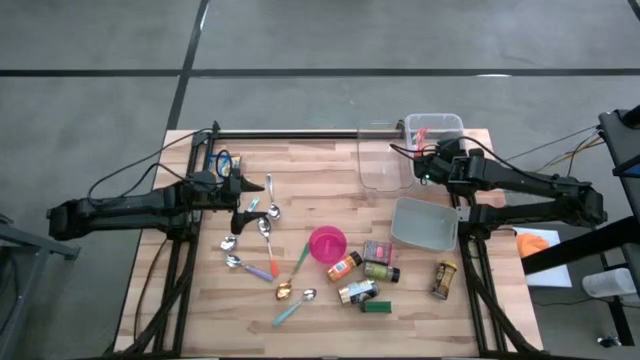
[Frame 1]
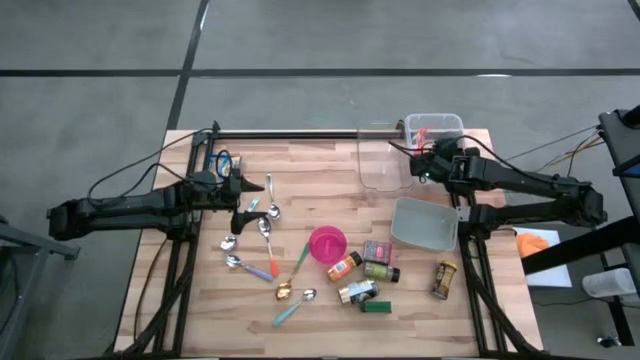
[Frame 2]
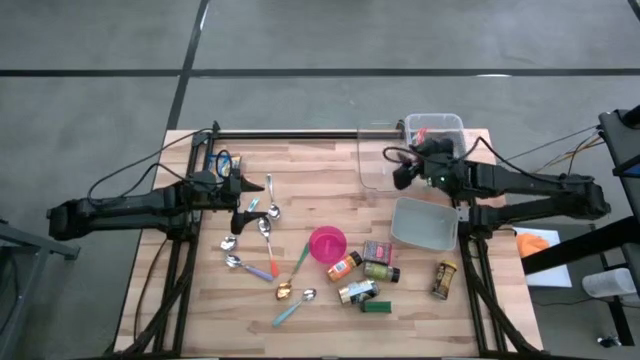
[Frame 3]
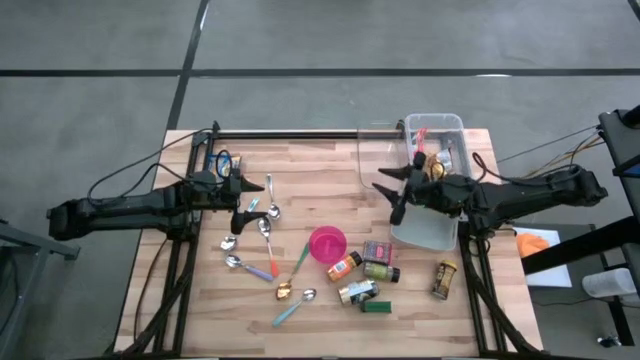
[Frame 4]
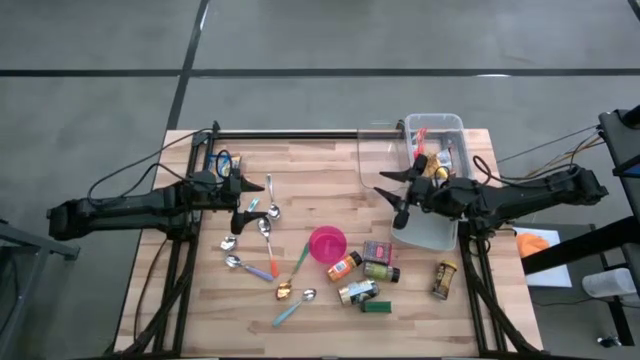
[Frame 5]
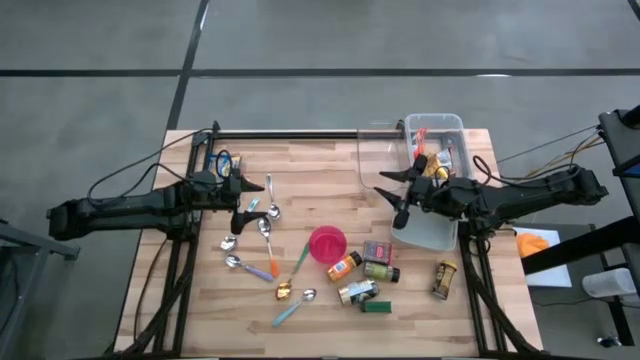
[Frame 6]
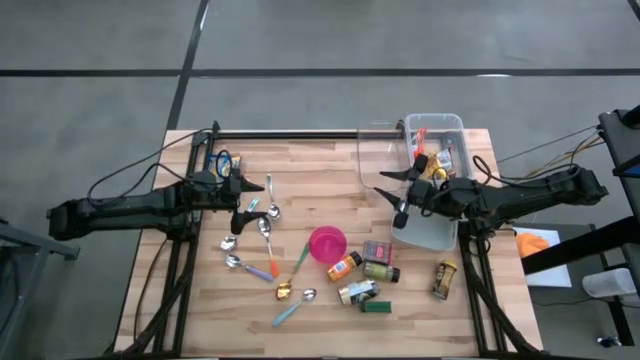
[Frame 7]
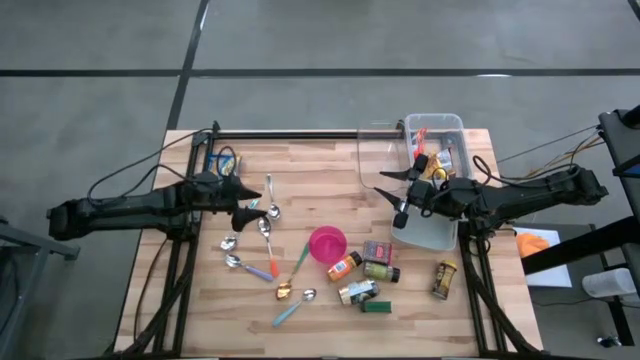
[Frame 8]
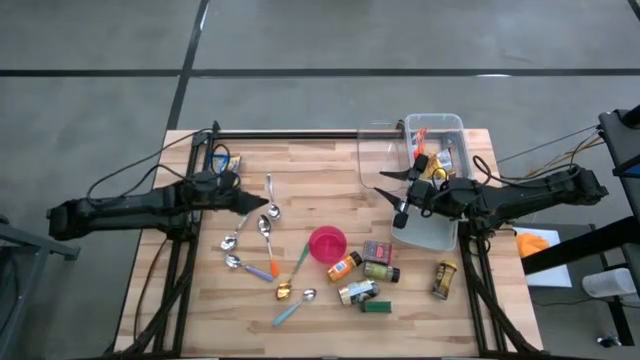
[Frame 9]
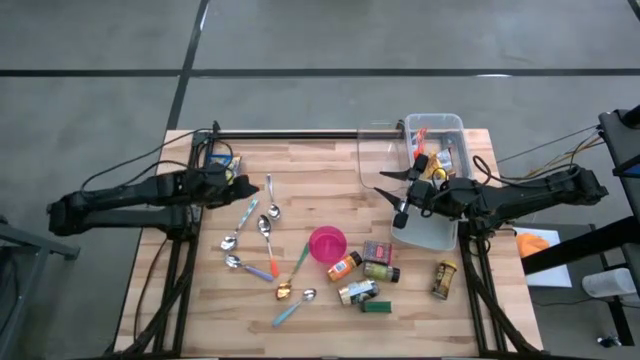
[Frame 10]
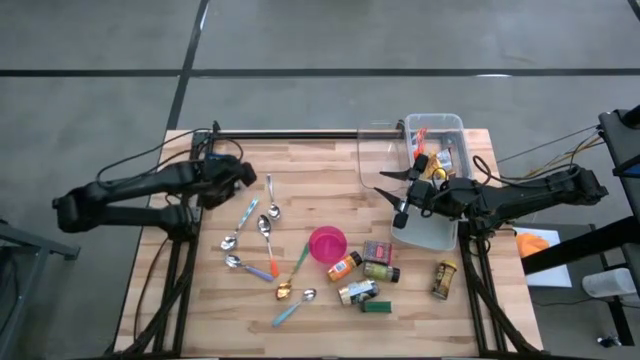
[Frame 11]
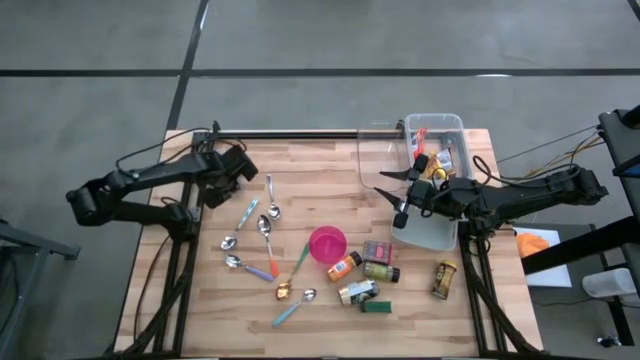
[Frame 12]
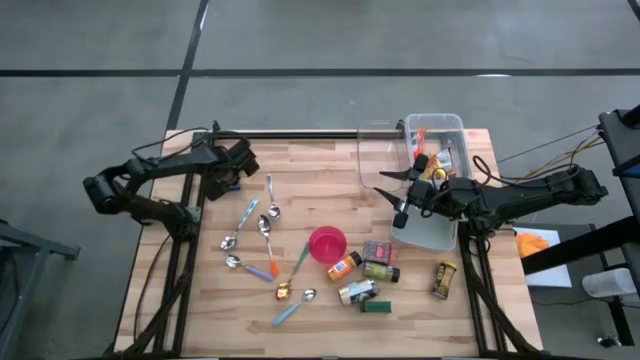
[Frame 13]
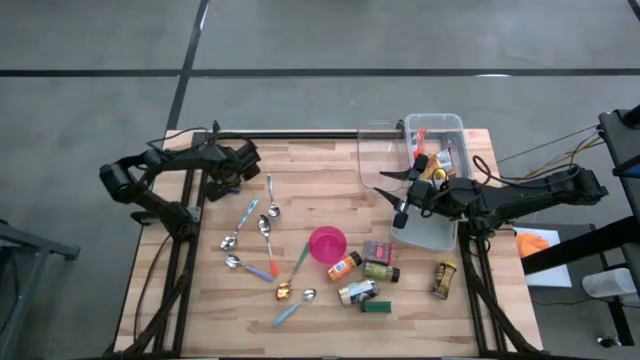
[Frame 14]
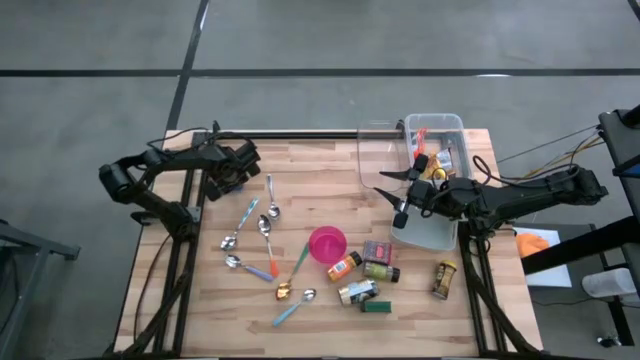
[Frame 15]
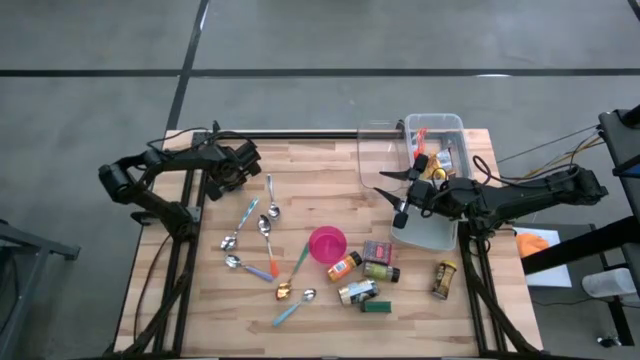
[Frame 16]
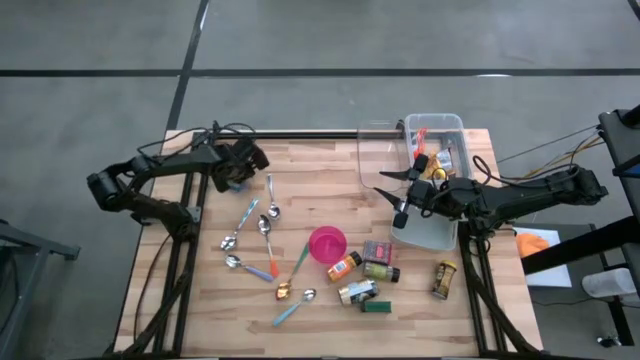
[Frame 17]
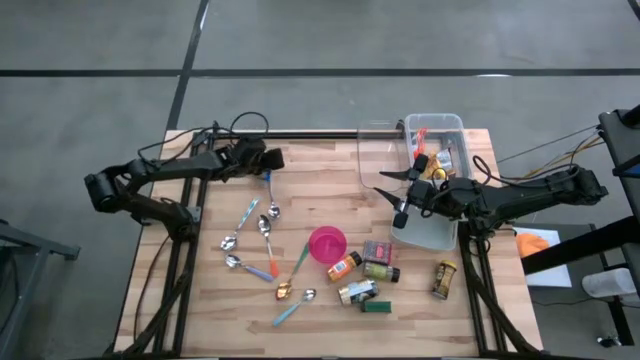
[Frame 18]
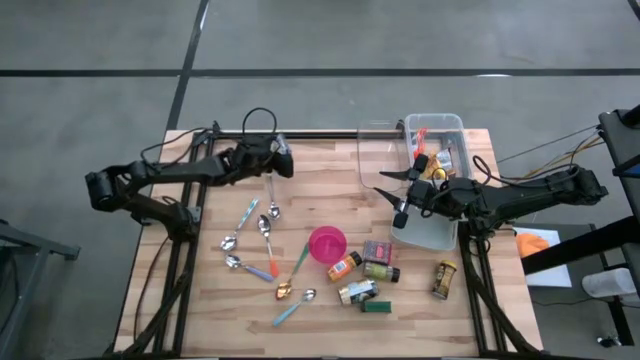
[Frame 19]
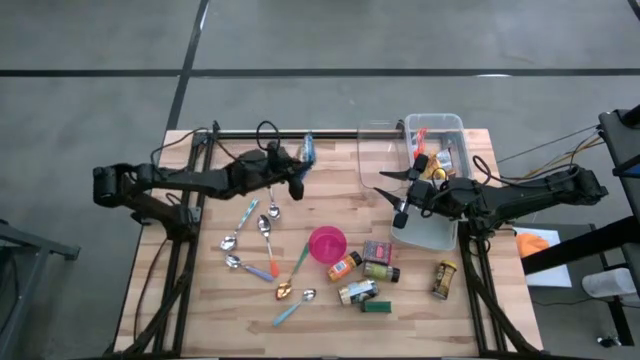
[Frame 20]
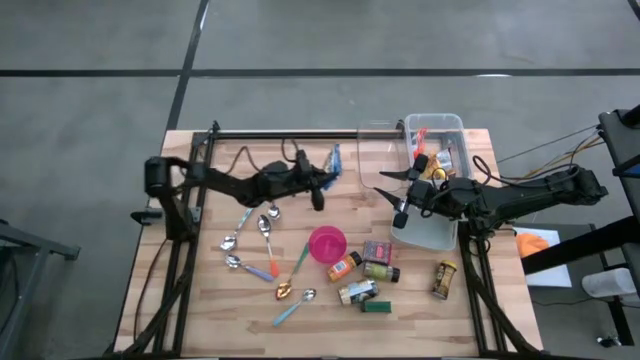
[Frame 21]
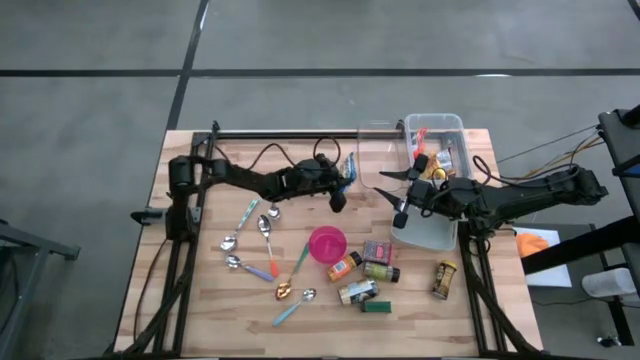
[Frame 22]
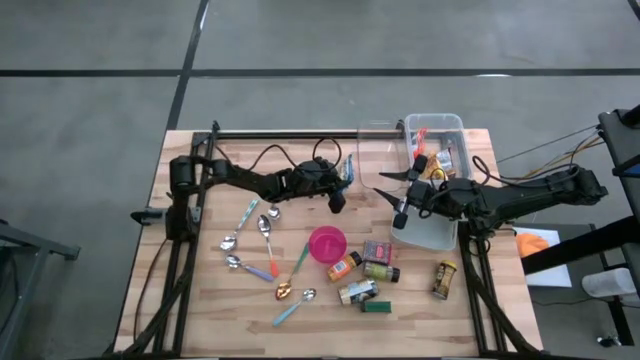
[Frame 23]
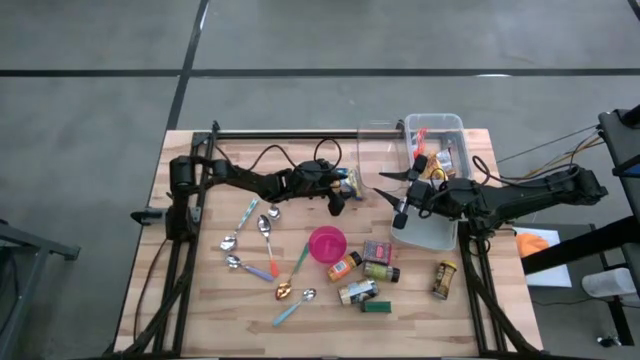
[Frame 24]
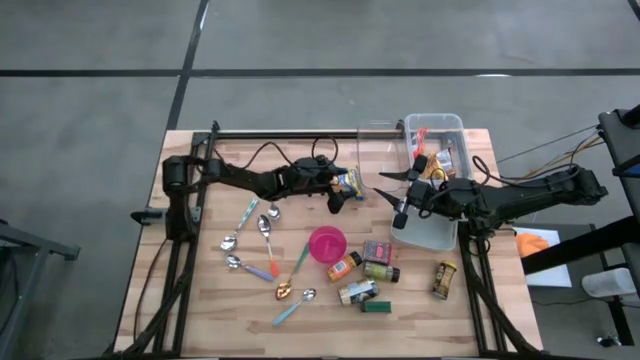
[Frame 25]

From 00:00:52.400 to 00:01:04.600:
Put the blue noodle pack into the white bin

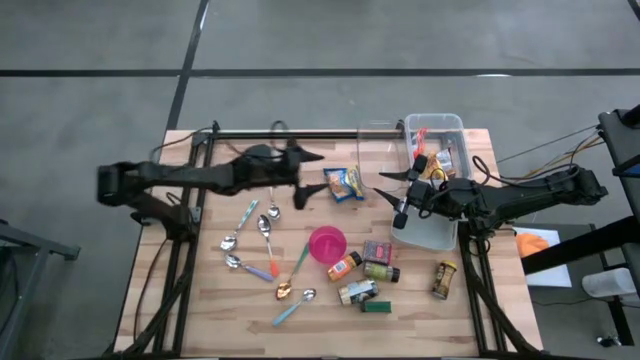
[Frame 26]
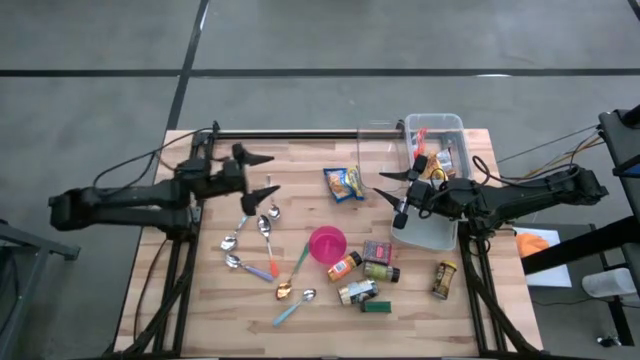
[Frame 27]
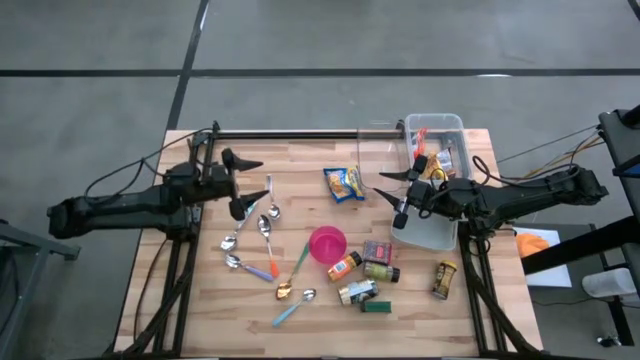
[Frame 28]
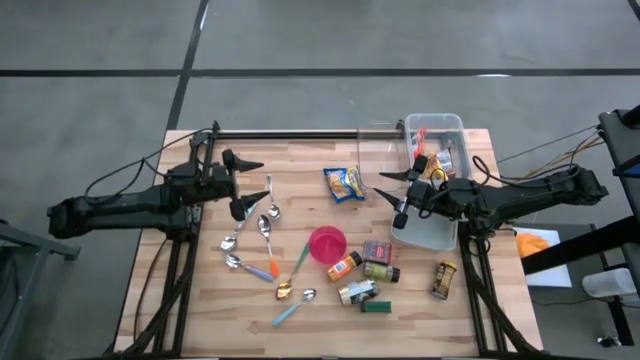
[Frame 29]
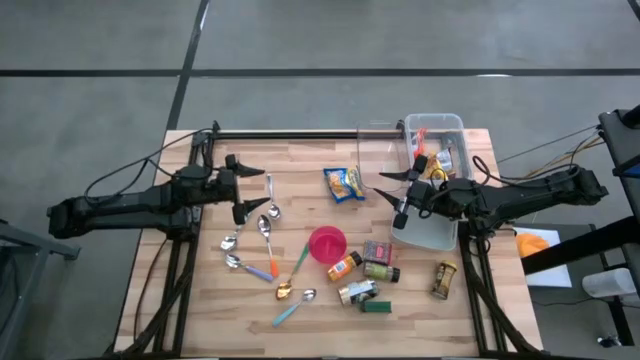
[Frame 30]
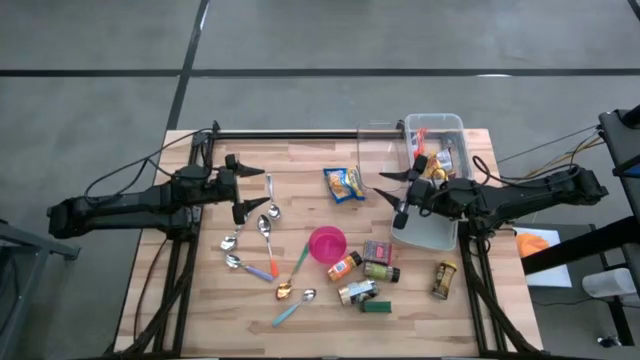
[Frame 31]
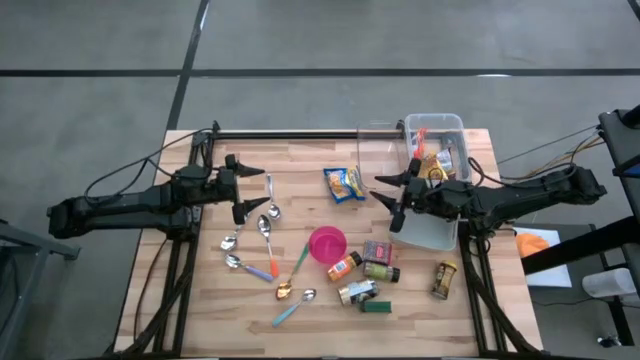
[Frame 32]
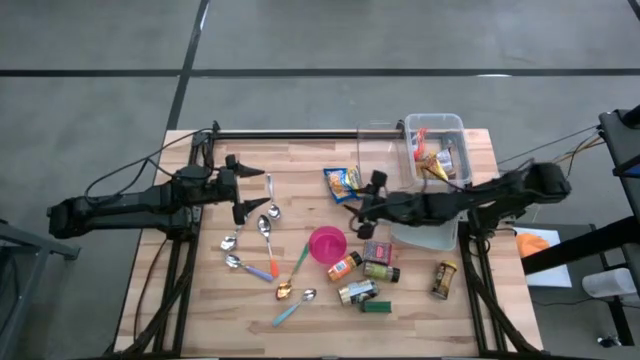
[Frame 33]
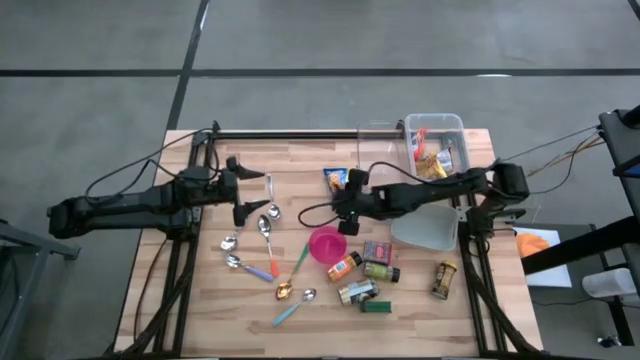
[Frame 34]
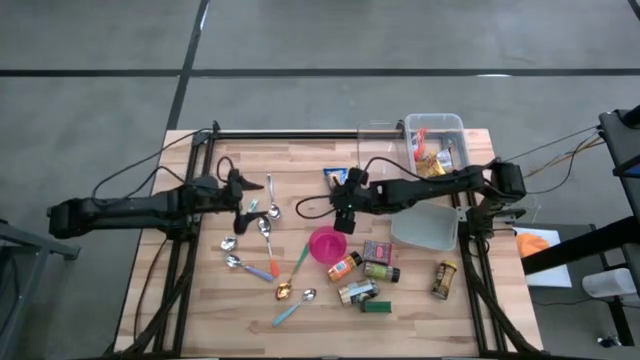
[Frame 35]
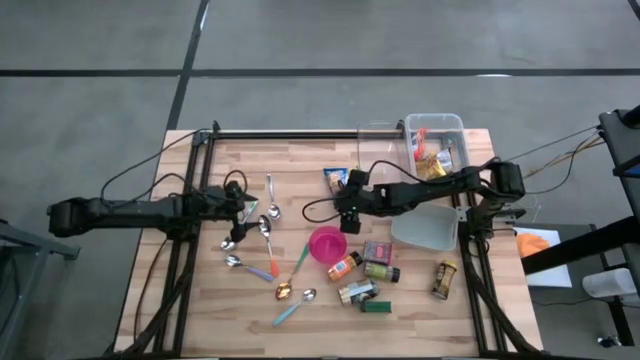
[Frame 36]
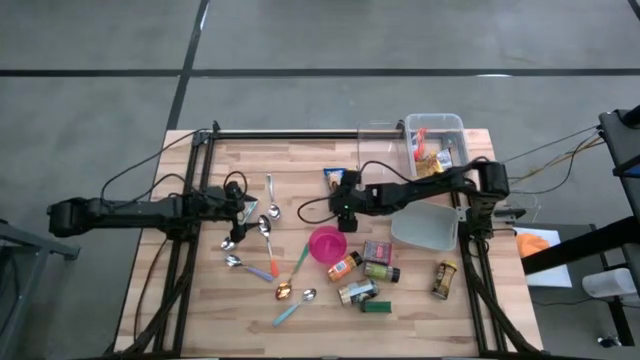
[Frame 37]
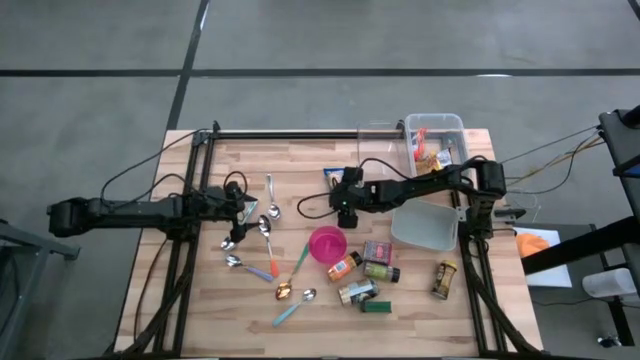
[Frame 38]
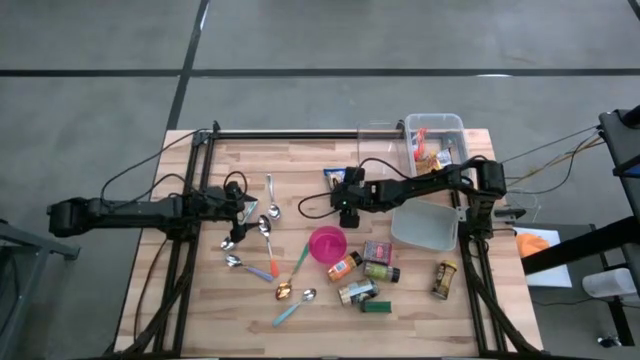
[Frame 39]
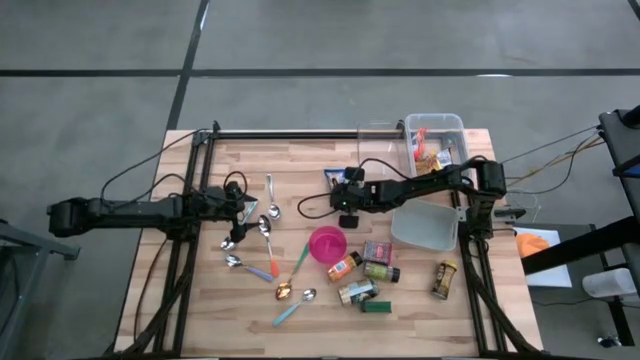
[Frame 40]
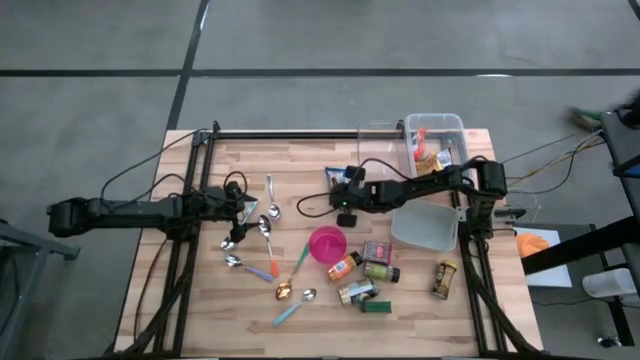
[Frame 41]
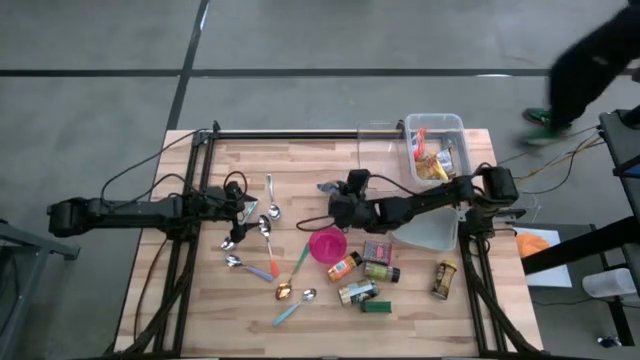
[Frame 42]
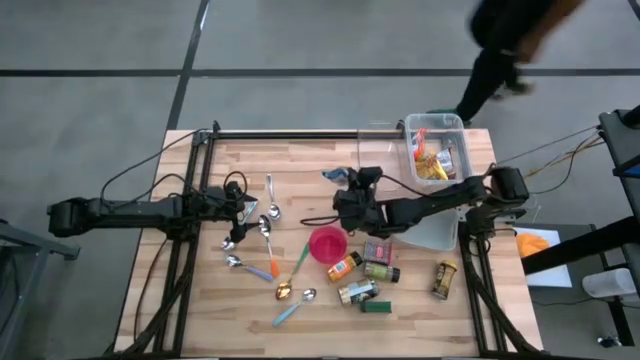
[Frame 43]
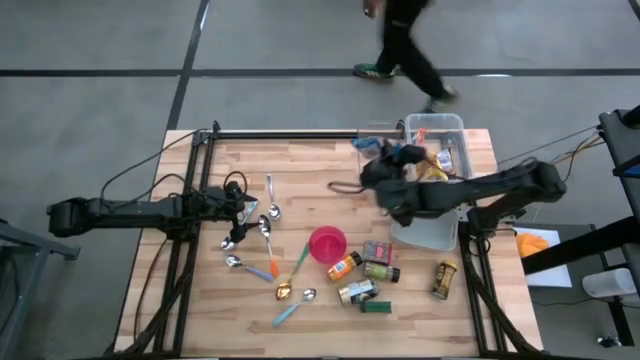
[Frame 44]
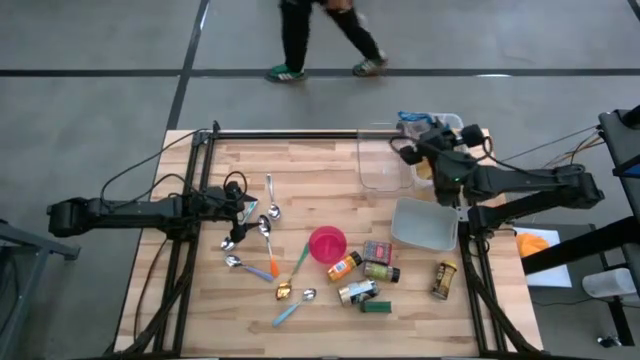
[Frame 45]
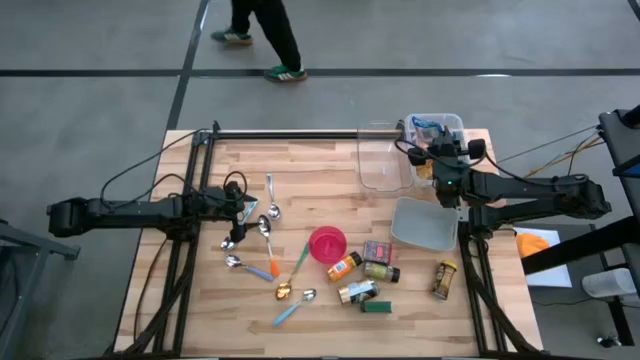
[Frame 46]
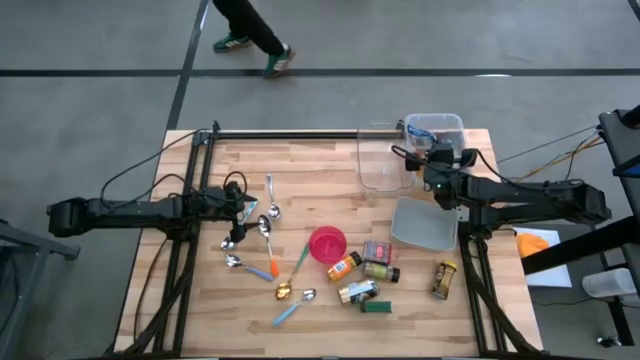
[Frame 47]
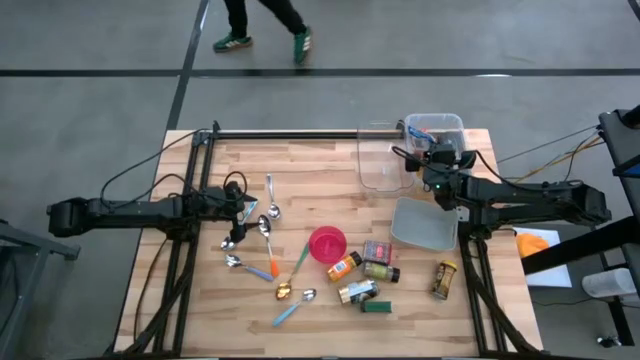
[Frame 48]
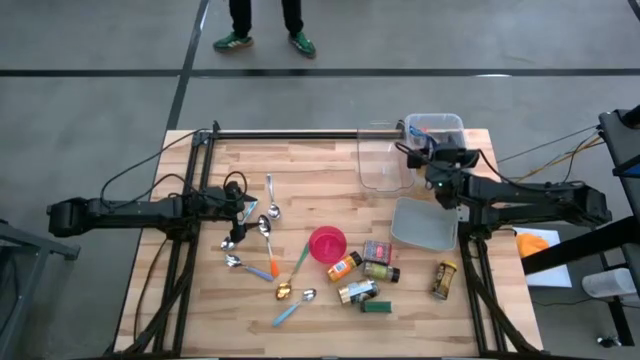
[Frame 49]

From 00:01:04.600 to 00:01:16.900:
Put the blue noodle pack into the white bin
